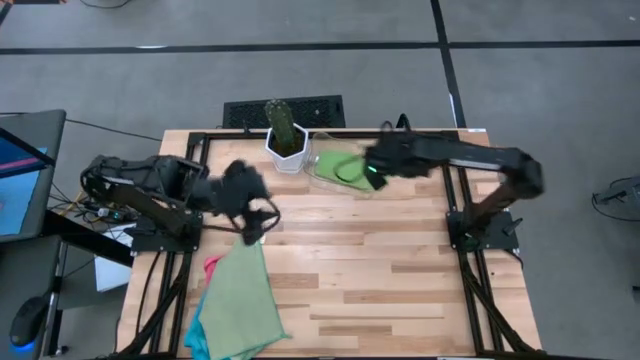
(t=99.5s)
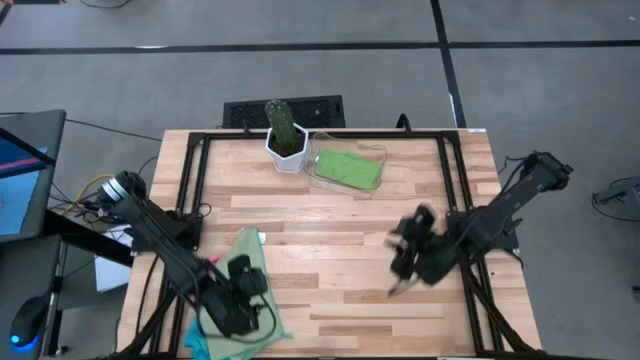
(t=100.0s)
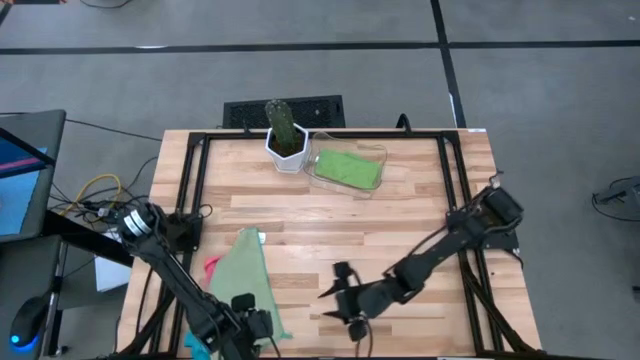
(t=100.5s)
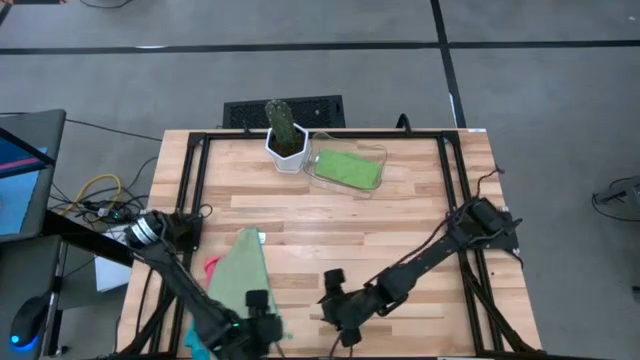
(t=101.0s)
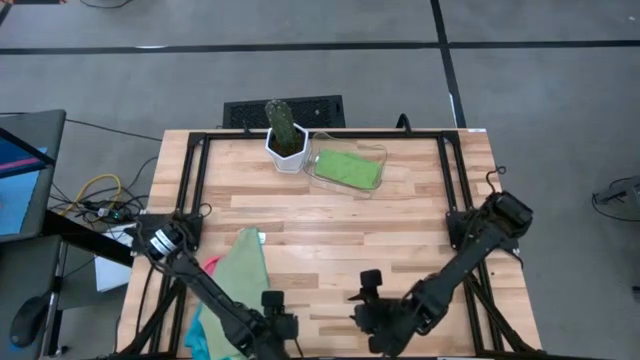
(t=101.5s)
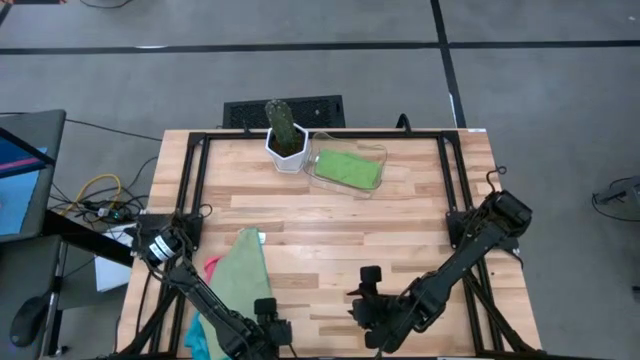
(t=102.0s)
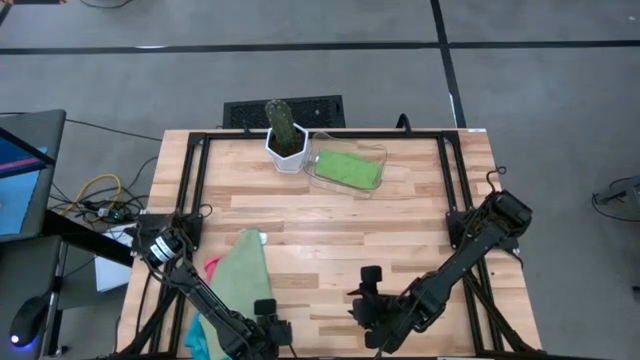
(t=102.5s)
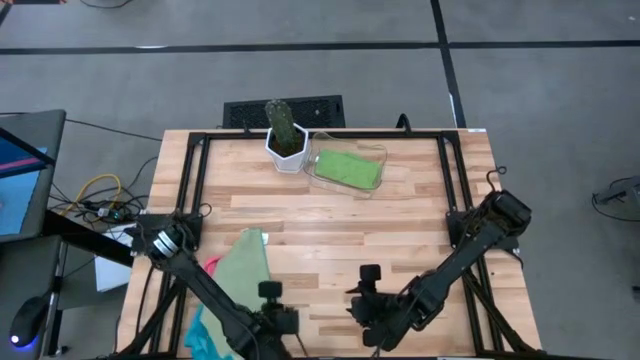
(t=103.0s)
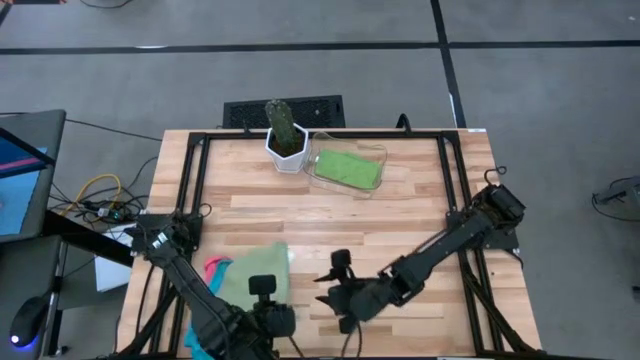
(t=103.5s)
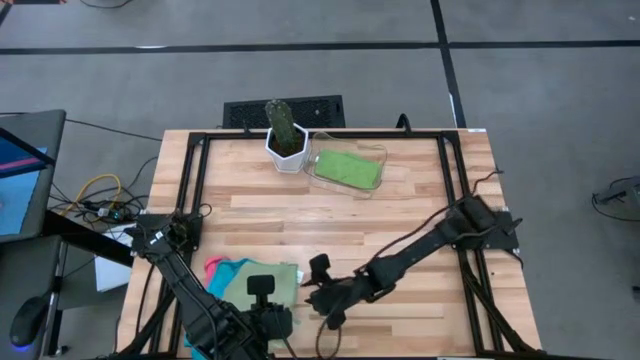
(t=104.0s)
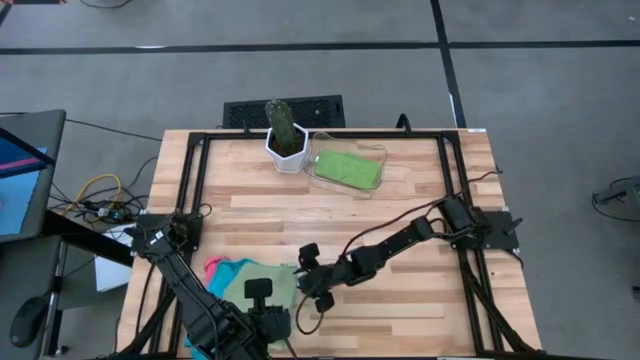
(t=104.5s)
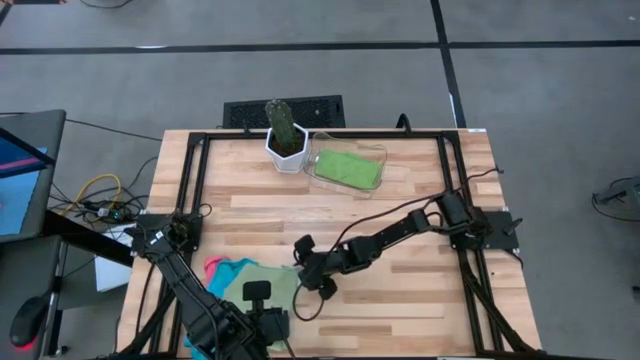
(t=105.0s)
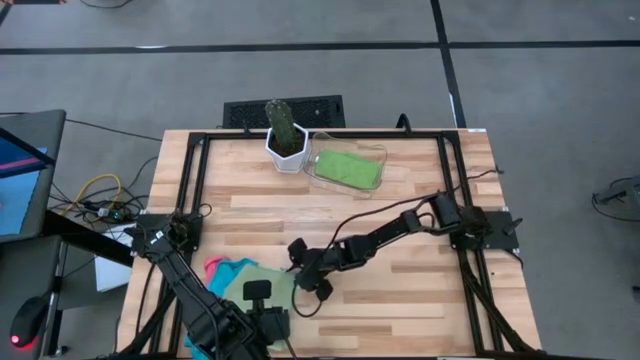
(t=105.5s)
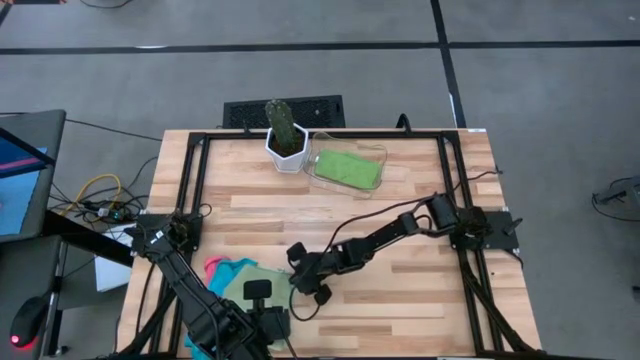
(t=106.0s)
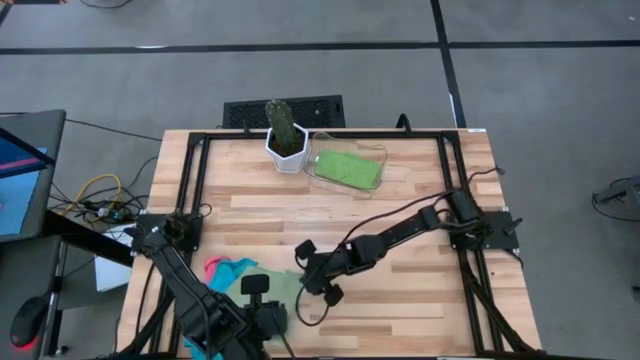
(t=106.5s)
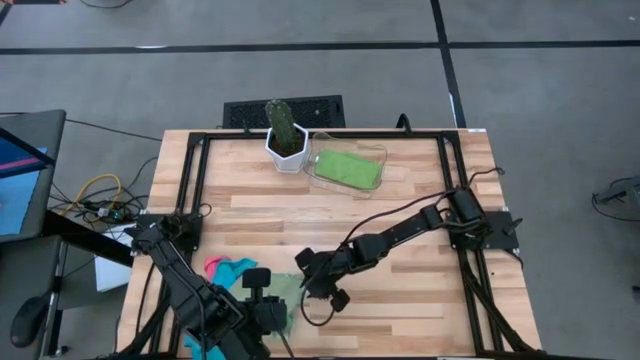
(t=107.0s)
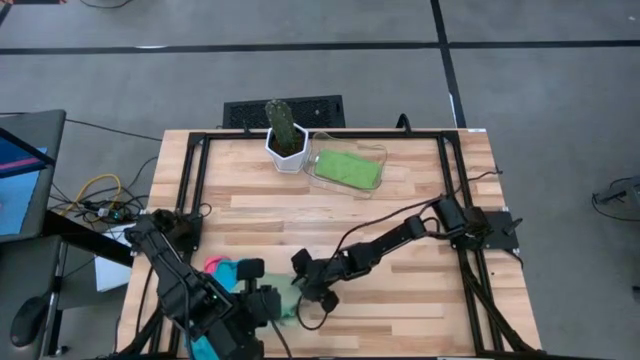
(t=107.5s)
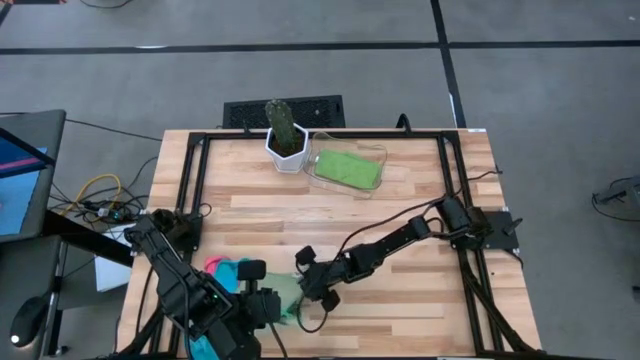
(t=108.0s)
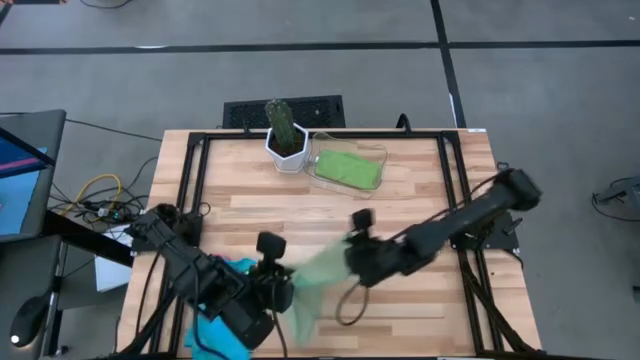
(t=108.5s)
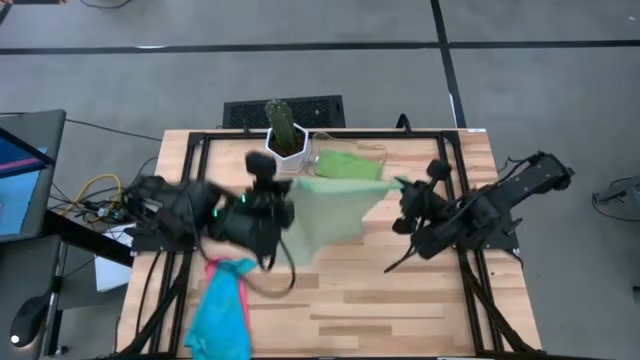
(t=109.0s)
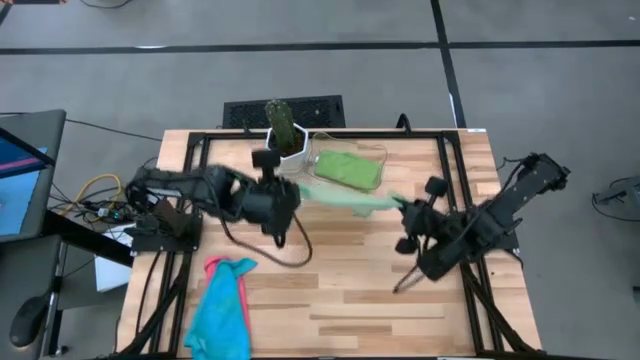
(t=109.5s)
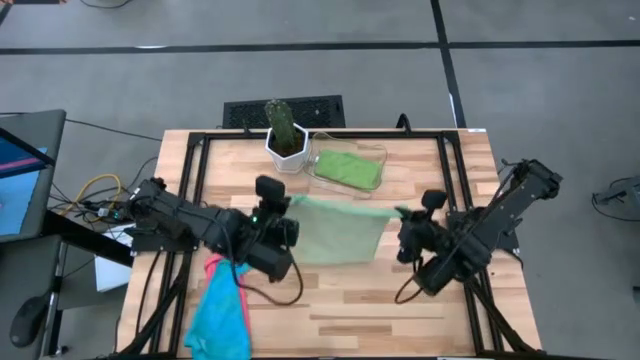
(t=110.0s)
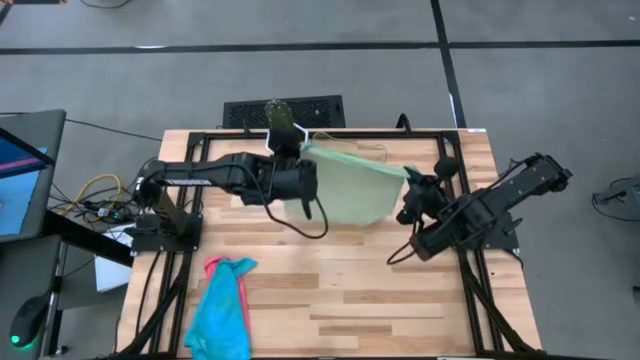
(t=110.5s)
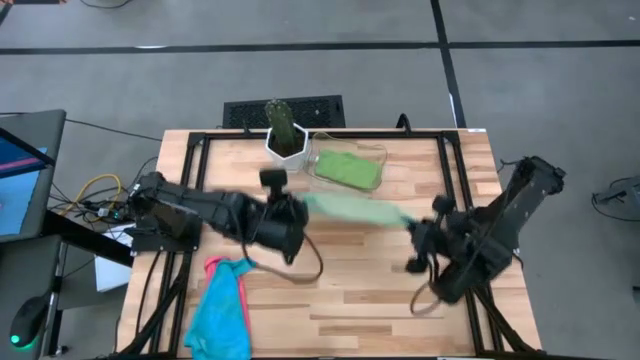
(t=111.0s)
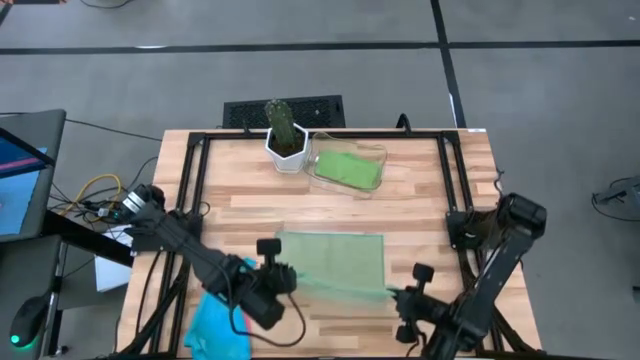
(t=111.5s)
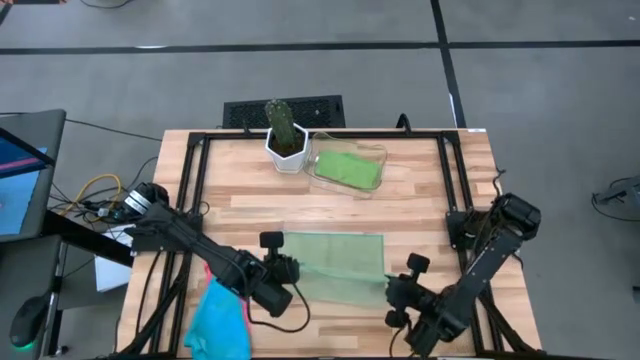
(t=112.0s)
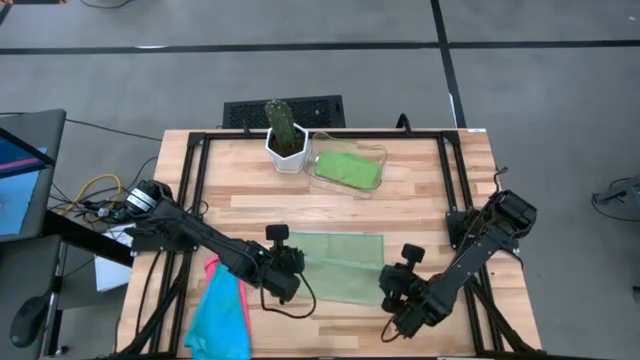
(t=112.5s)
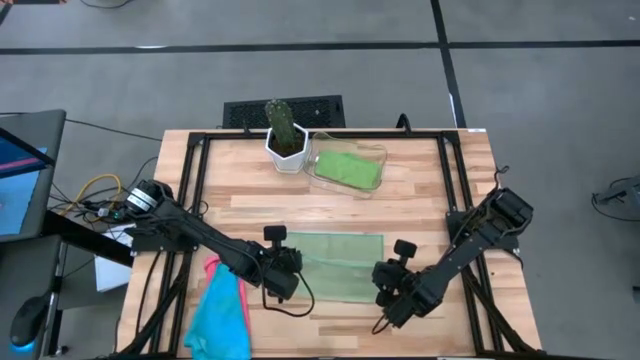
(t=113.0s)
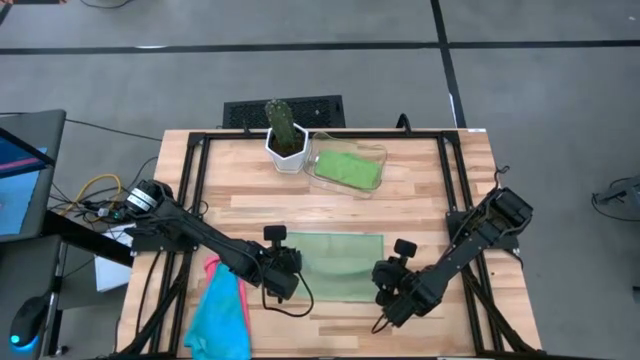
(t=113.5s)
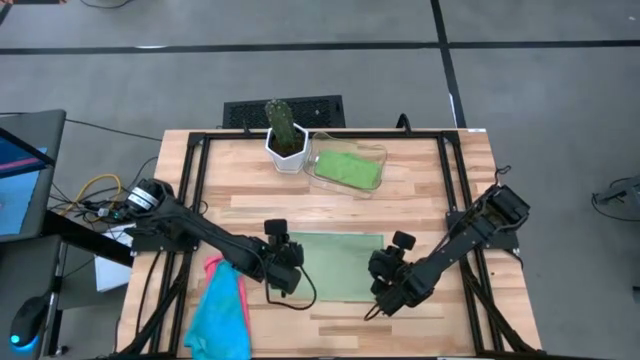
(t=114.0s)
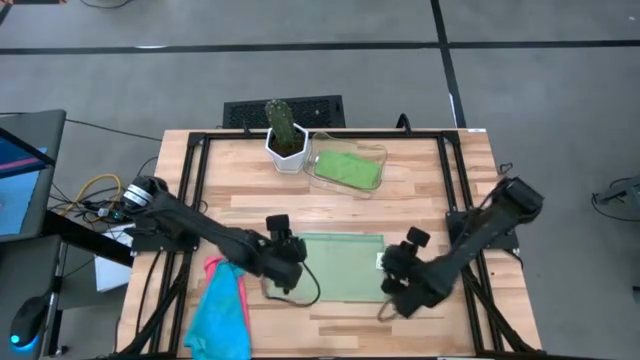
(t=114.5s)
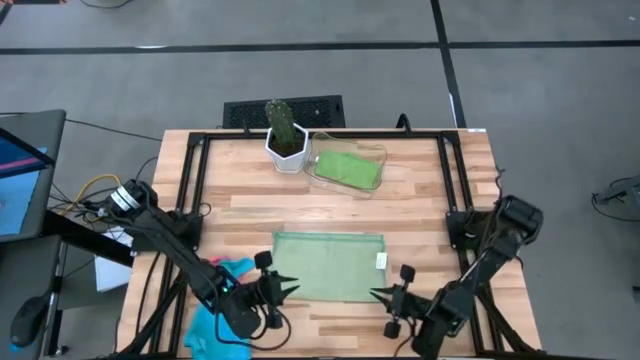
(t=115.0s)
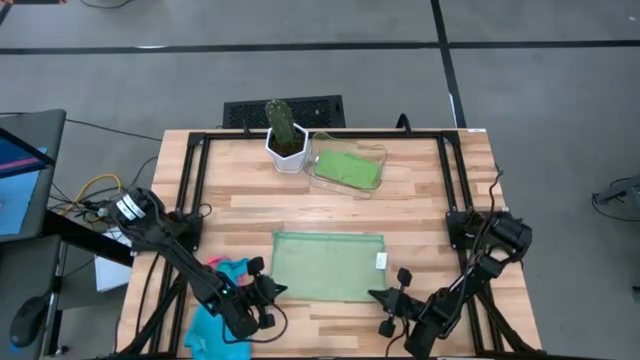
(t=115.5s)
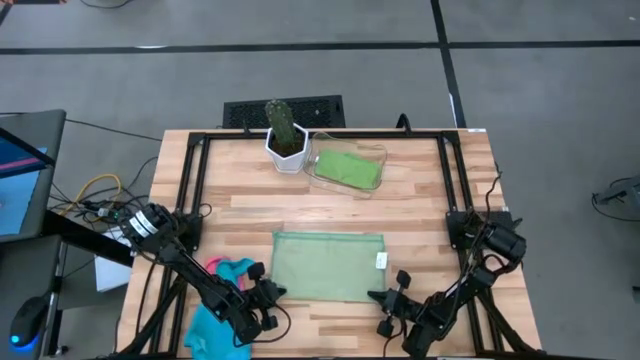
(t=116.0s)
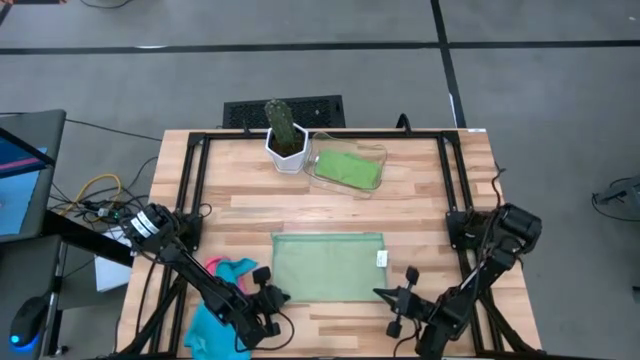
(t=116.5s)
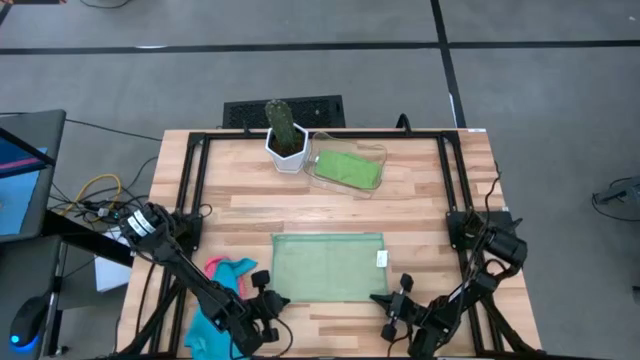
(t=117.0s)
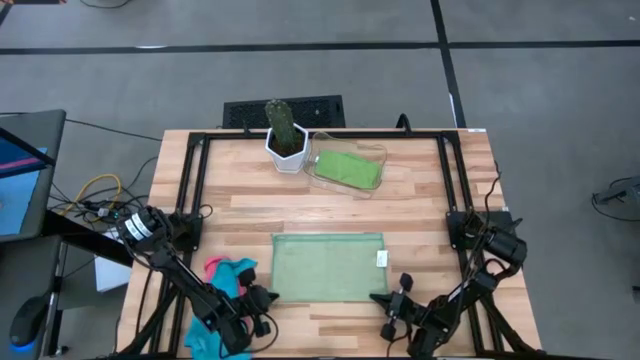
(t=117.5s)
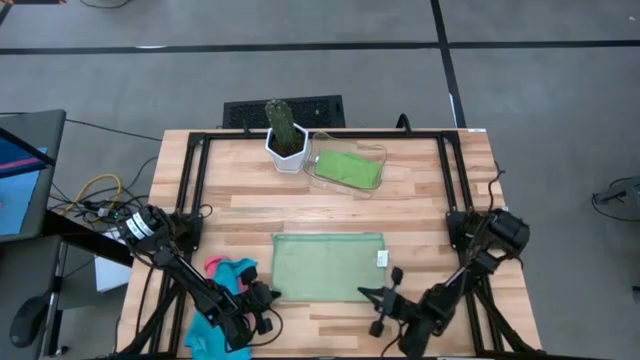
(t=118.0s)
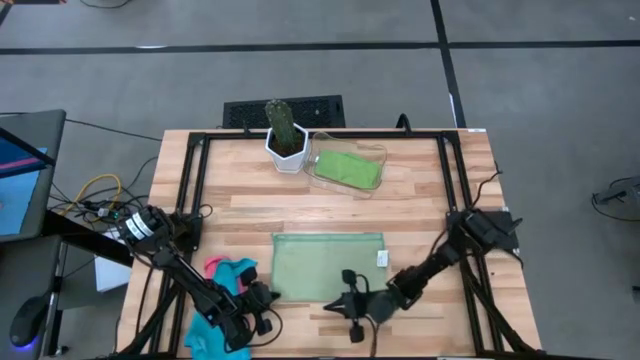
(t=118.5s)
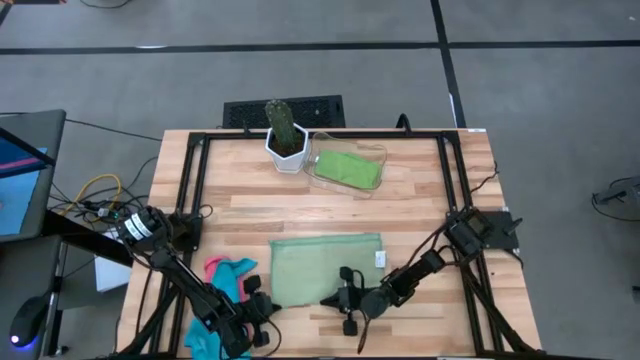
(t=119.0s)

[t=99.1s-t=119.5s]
Task: Fold microfiber towels
Fold the light green towel

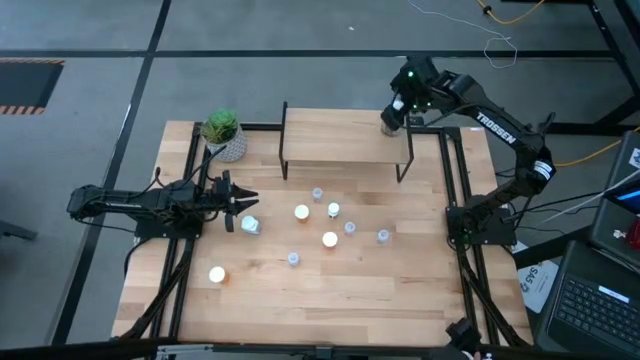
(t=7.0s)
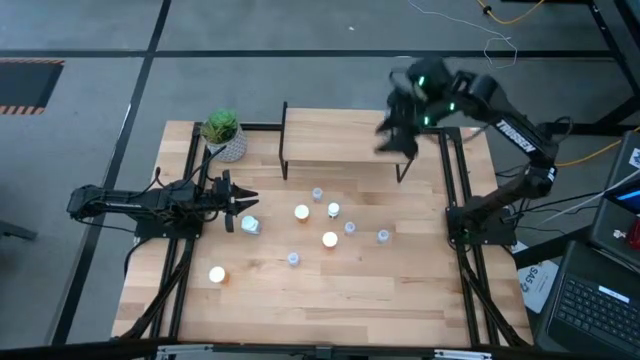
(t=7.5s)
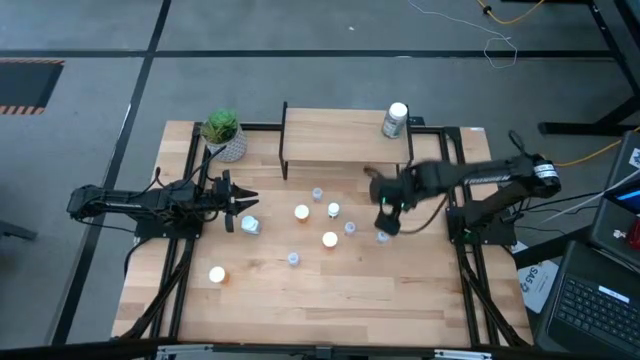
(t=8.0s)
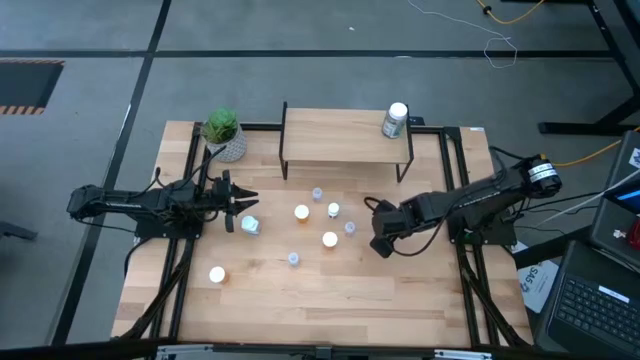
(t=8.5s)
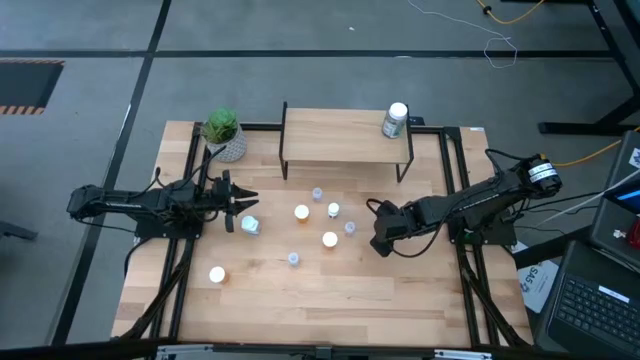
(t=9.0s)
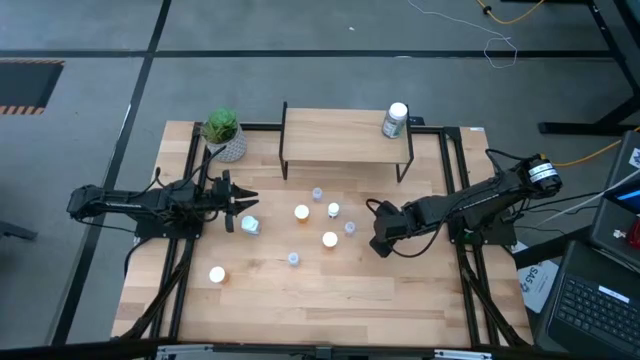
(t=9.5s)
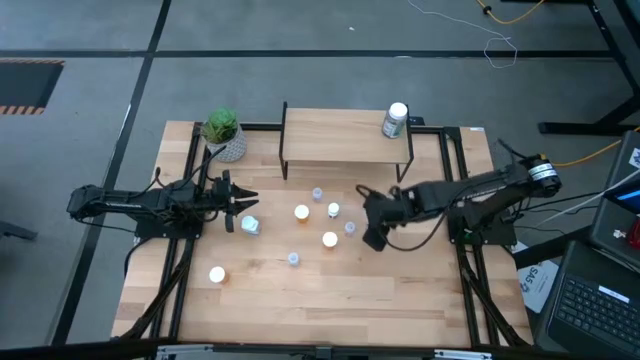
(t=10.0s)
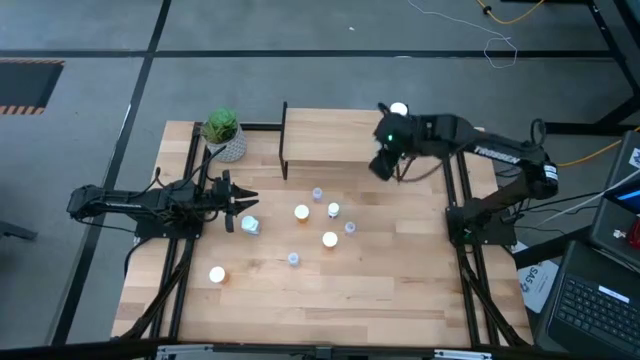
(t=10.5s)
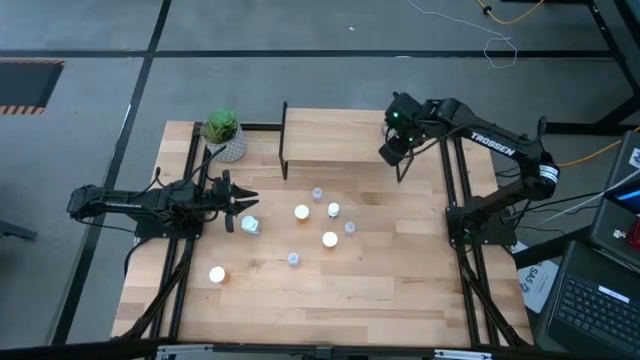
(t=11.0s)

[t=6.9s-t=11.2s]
Task: Pick and place medicine bottles onto shelf by color
Put the transparent pill bottle on the shelf
